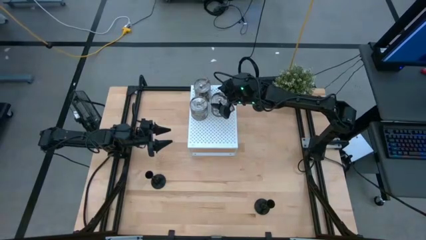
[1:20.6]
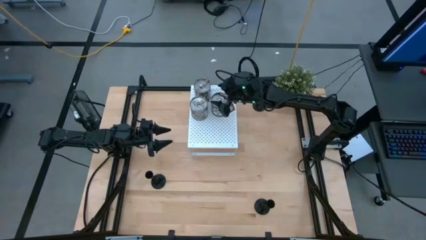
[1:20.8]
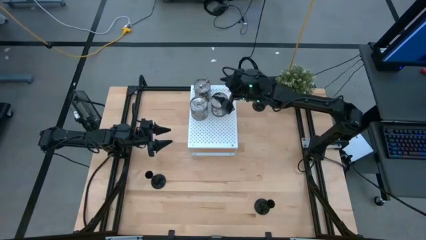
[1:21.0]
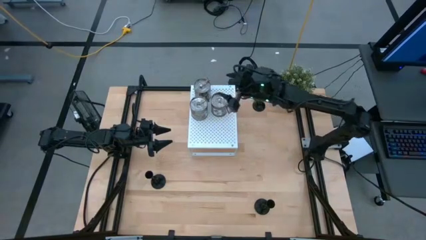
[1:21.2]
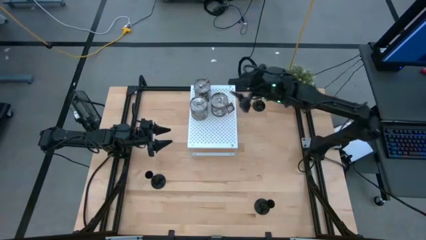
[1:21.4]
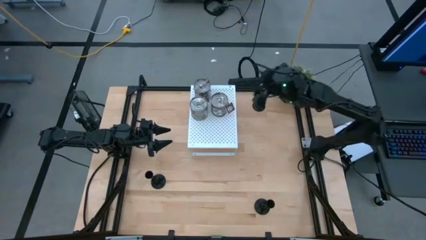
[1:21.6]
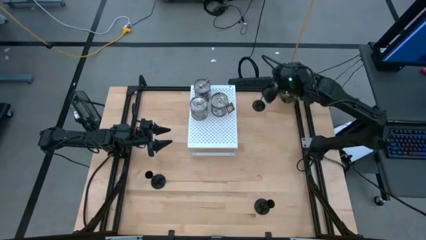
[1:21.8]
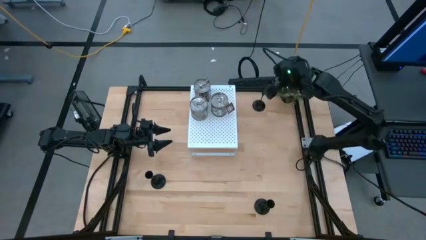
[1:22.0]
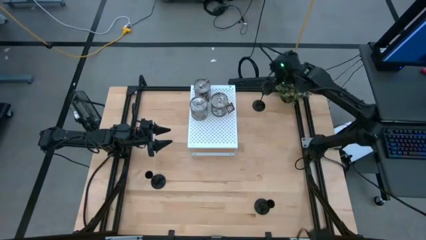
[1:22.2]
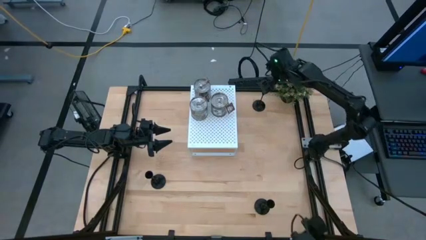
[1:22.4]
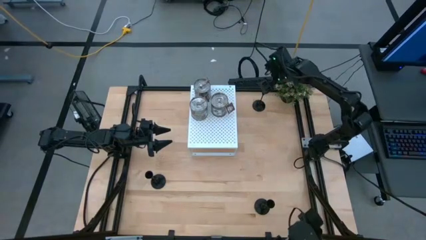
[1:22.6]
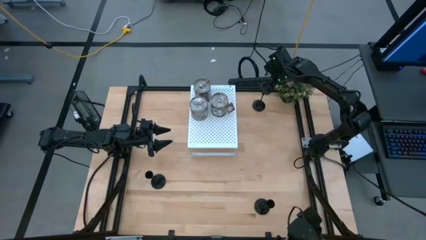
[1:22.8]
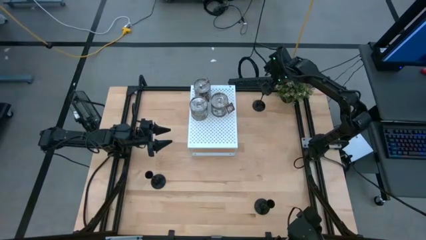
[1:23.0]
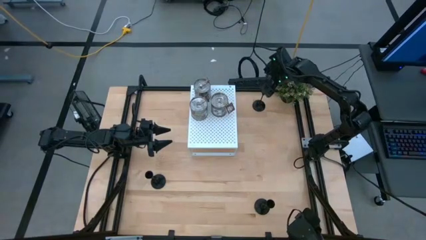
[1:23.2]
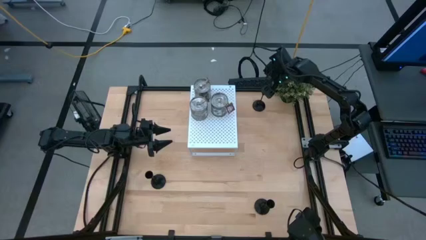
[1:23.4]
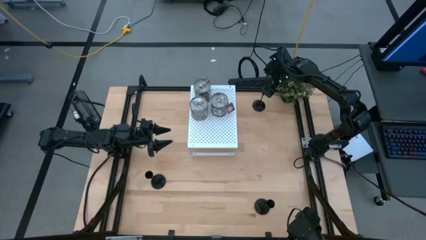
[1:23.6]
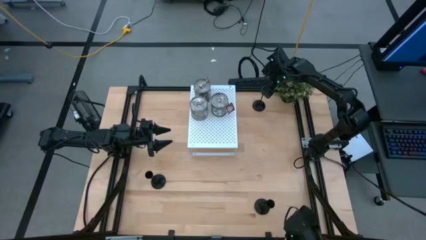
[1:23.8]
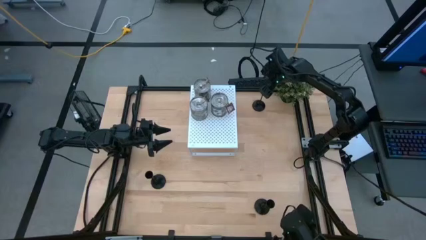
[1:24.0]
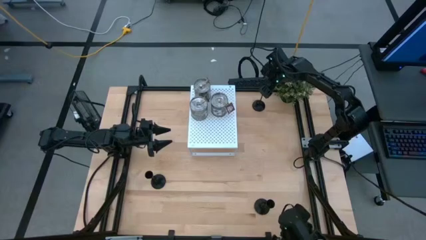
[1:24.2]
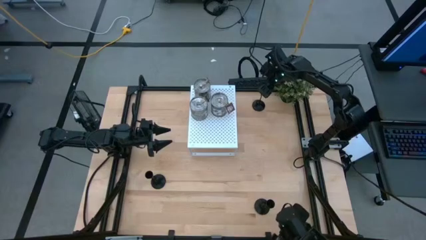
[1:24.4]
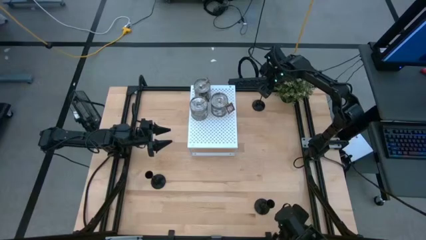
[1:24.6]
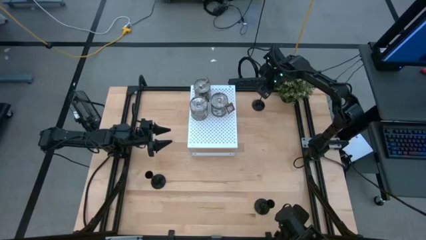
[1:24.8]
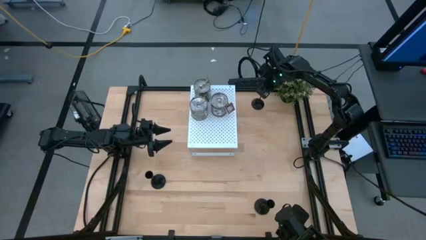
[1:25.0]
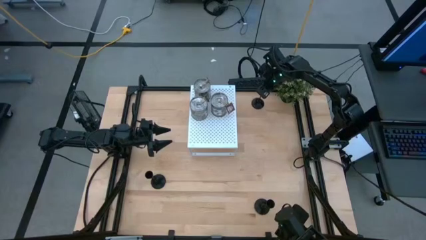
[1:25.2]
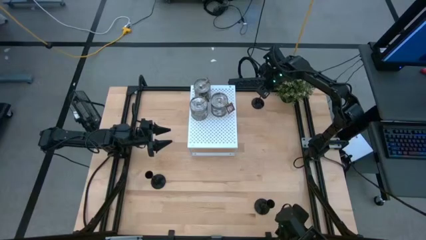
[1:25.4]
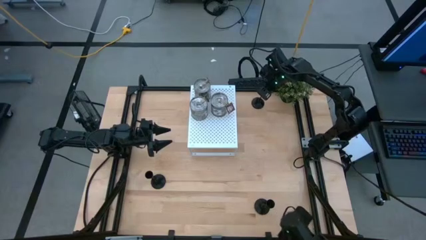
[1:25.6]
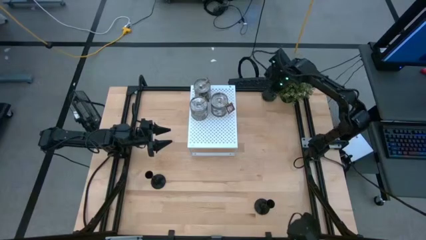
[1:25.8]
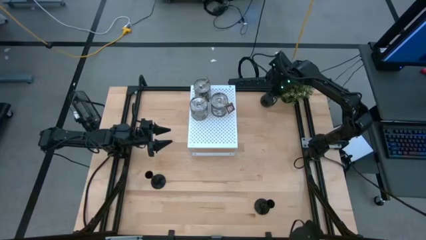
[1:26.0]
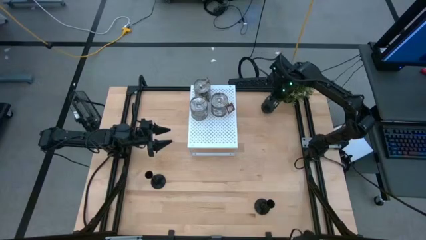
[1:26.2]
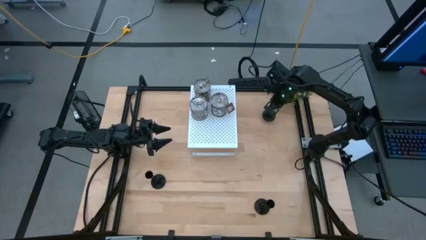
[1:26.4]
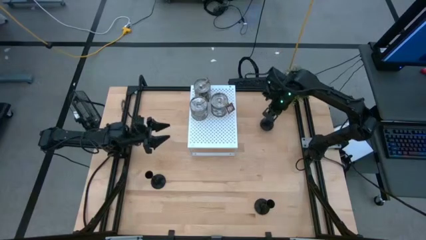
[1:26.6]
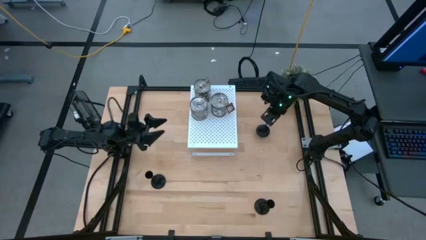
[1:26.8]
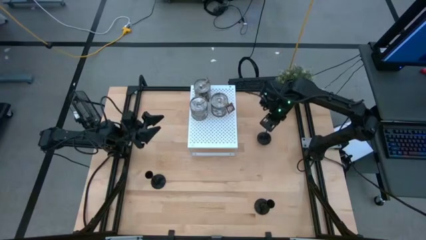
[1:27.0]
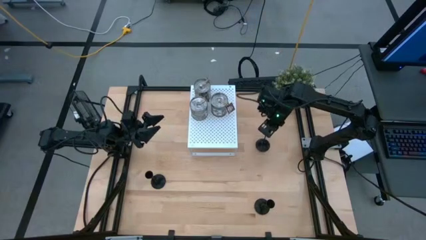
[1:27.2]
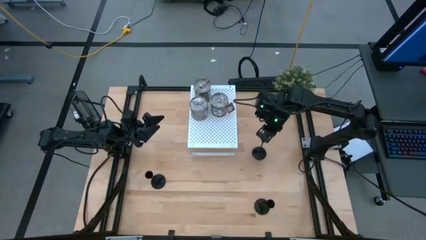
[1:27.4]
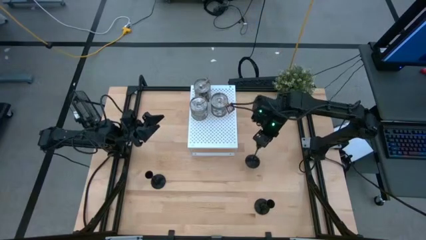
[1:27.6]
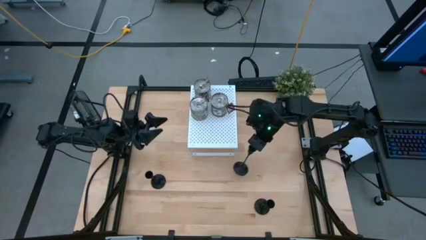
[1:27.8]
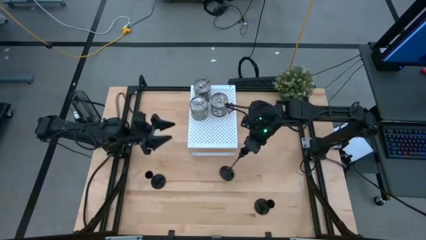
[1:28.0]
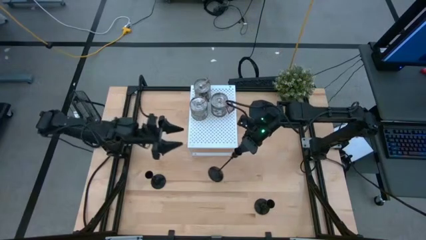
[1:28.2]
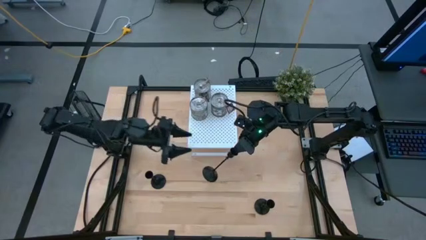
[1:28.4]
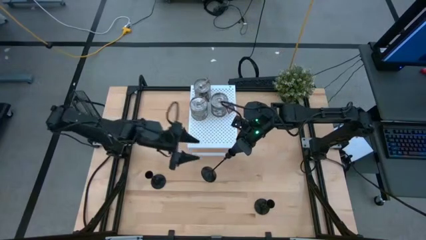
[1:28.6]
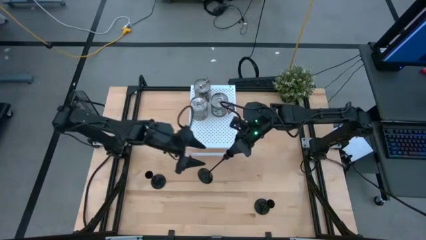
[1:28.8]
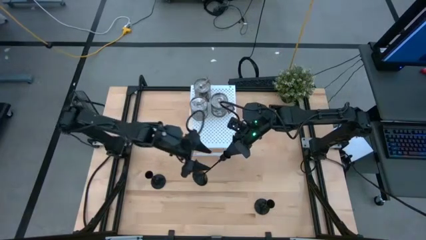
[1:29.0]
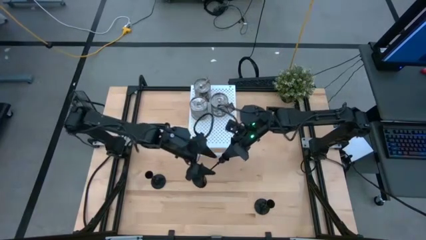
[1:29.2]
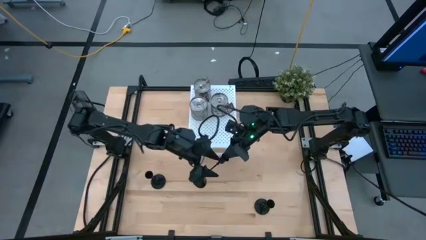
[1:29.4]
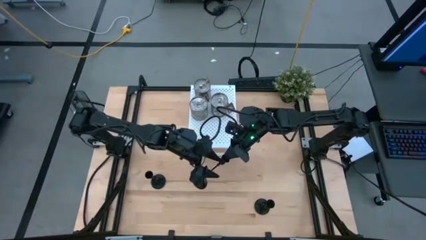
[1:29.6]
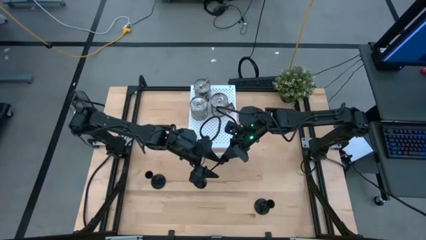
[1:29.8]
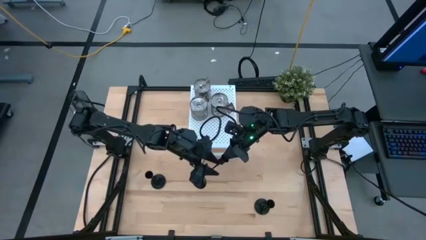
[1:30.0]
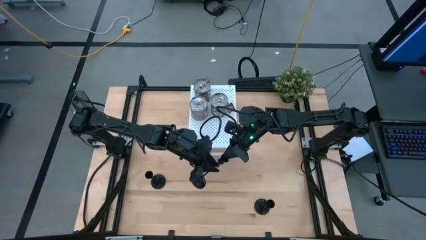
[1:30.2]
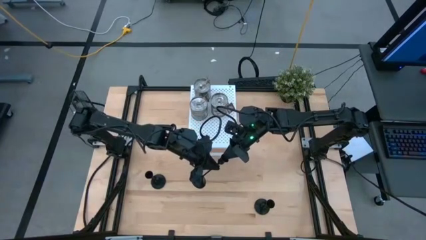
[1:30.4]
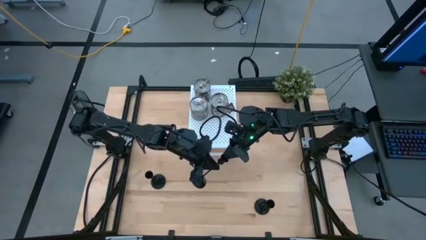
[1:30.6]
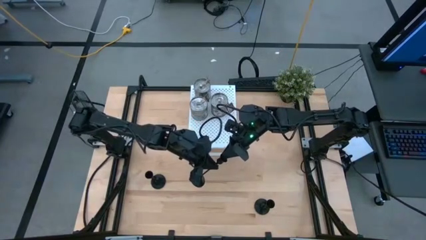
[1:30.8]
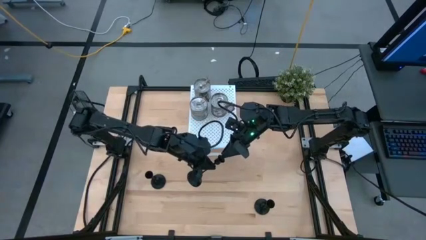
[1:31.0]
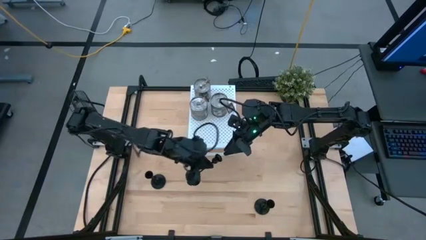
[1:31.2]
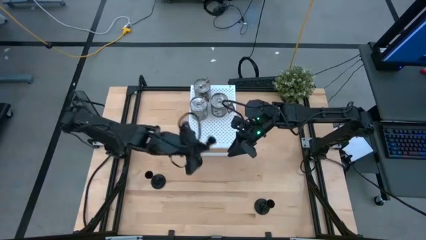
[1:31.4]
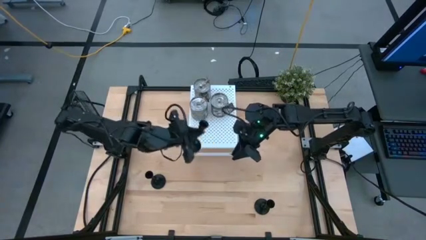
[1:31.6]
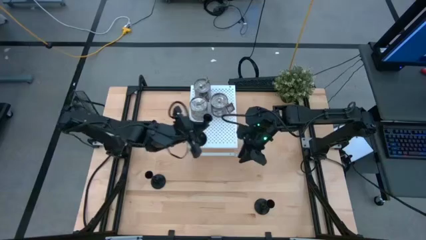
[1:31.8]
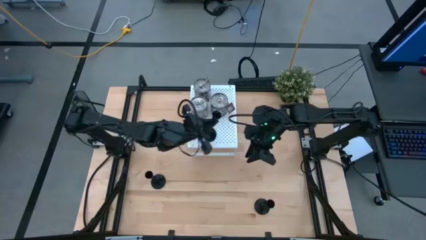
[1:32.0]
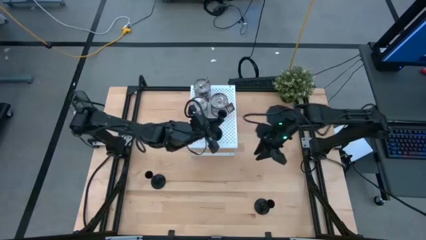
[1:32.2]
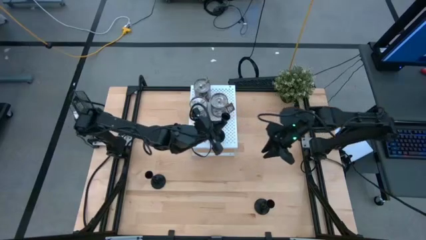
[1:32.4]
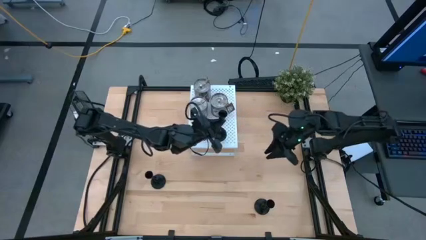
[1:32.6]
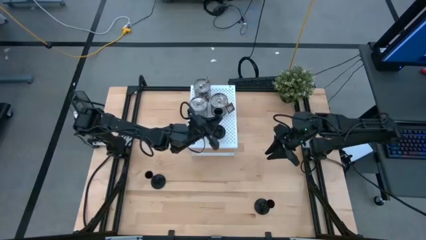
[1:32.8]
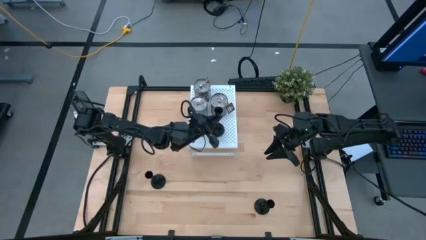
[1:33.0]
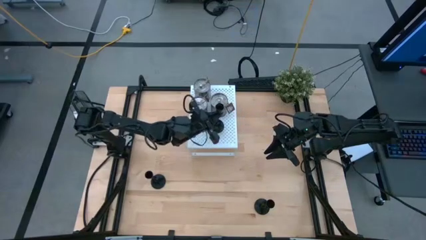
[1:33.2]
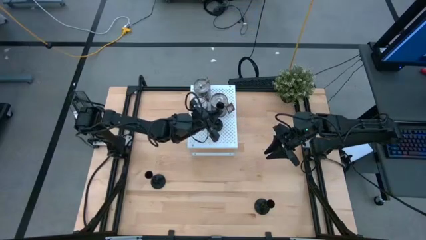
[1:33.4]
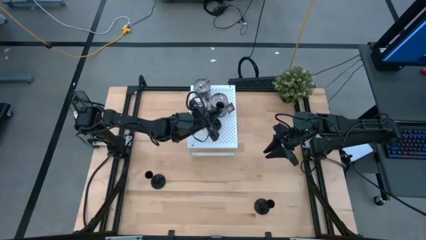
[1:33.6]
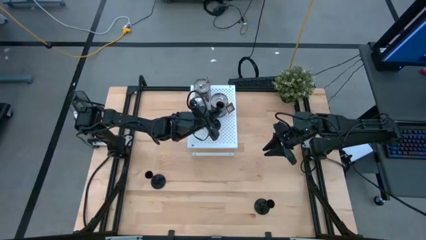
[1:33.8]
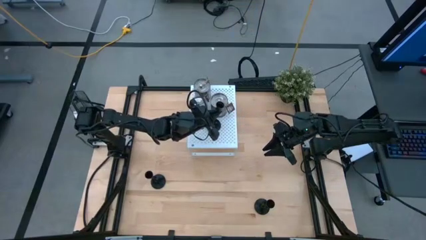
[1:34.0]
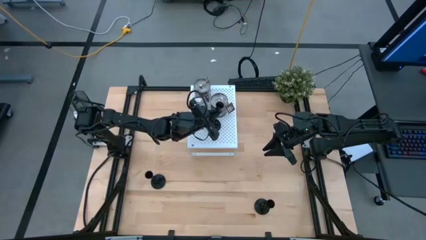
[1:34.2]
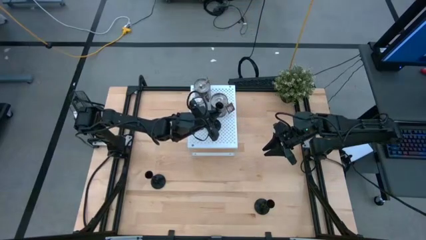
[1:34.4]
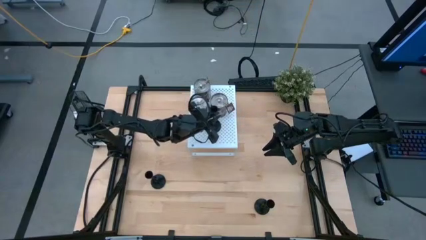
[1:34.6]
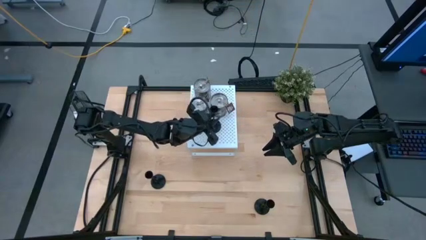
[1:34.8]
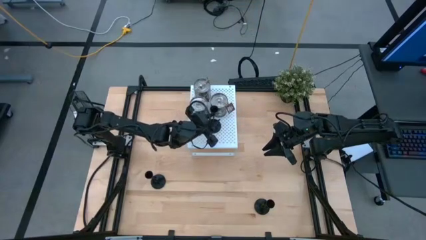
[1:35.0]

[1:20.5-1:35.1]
Task: Pick & Place candle stick holders
Put the top black candle holder on the shelf
